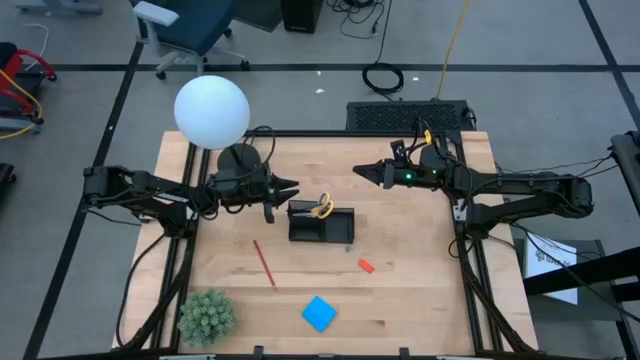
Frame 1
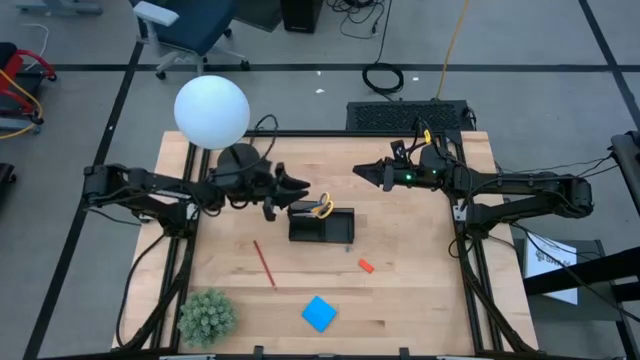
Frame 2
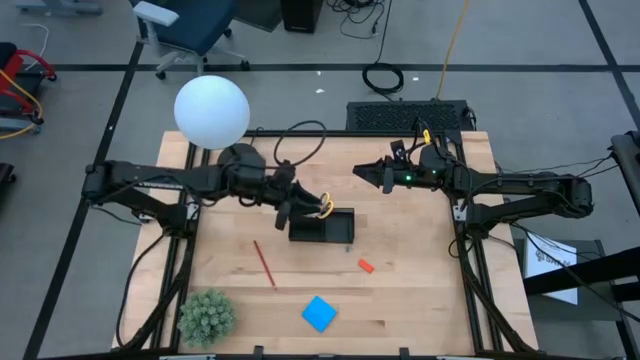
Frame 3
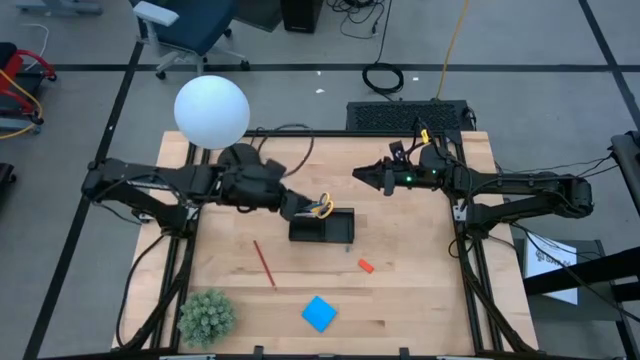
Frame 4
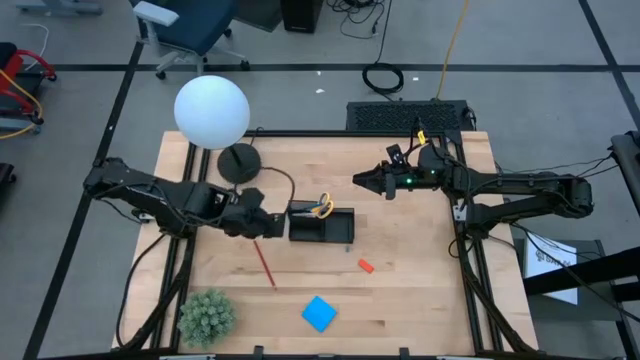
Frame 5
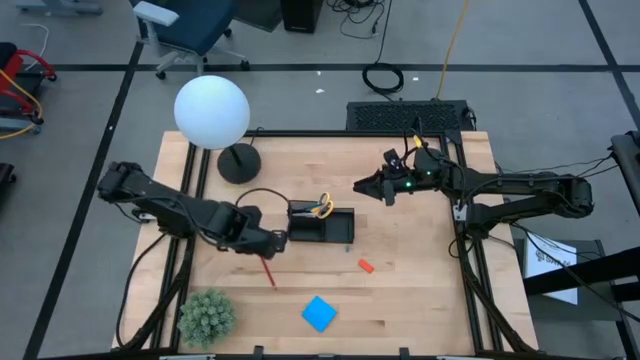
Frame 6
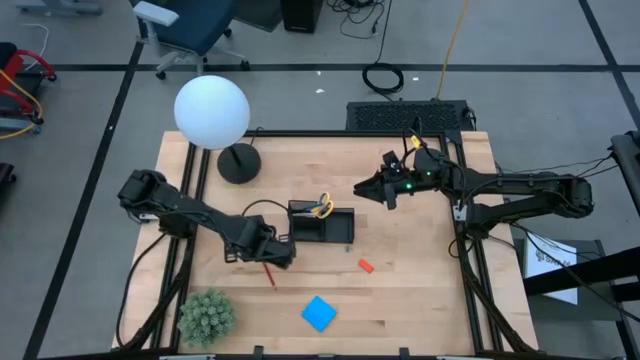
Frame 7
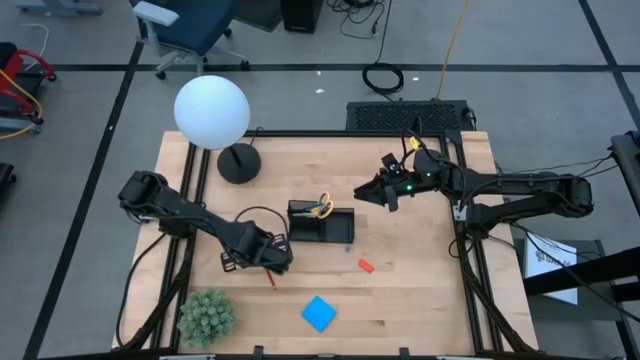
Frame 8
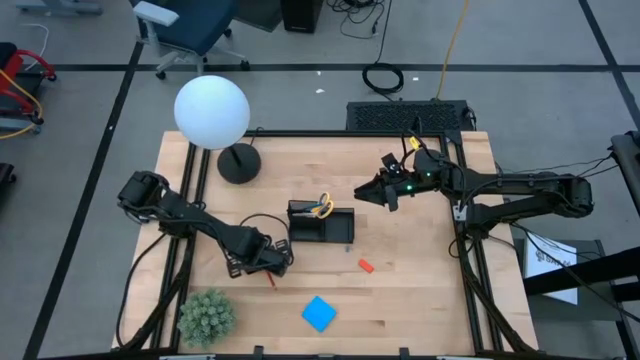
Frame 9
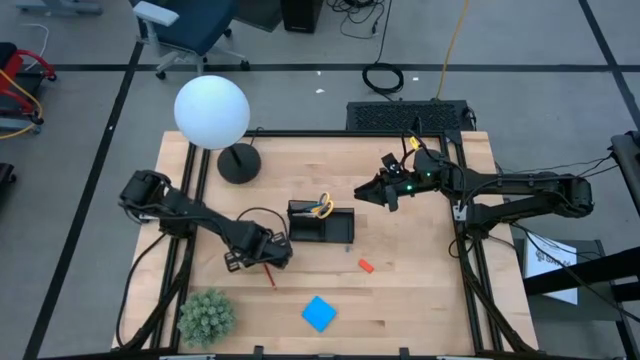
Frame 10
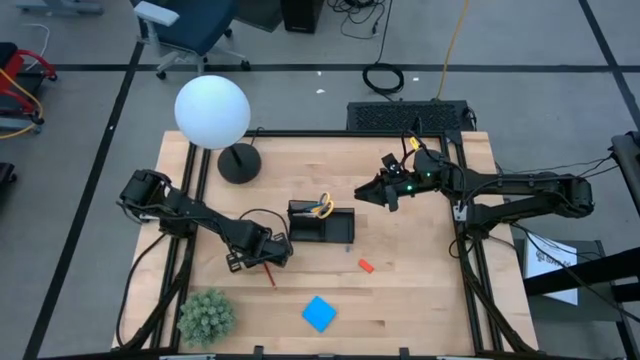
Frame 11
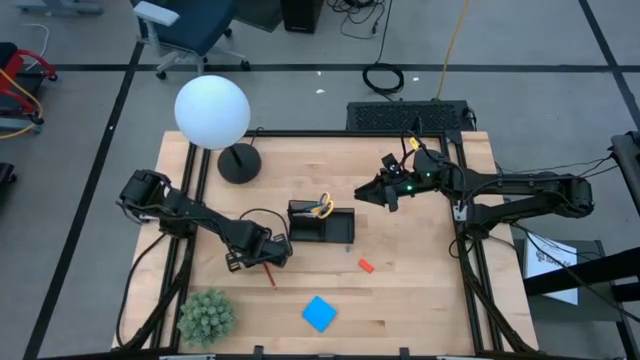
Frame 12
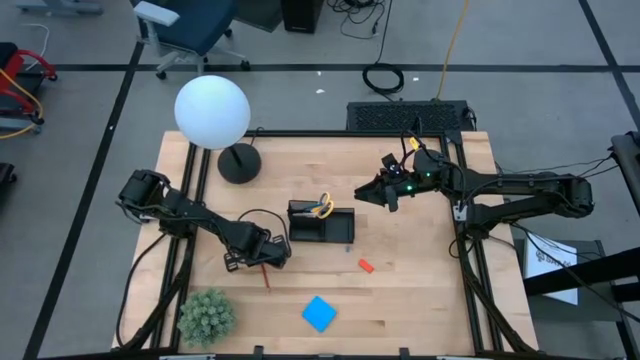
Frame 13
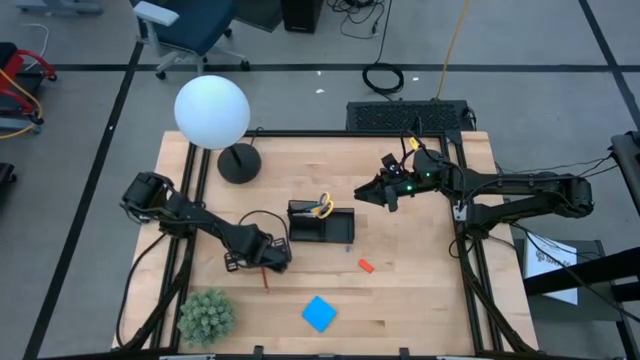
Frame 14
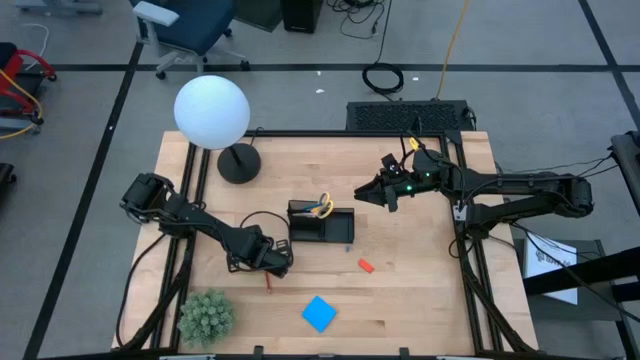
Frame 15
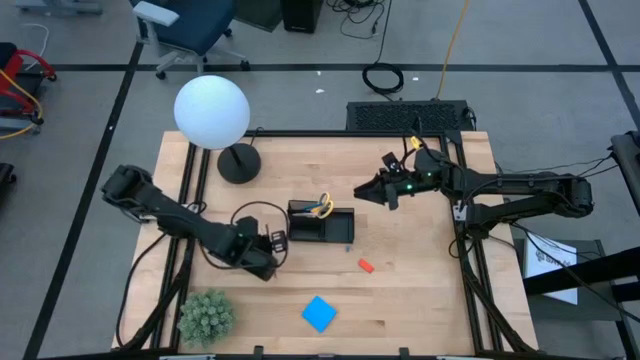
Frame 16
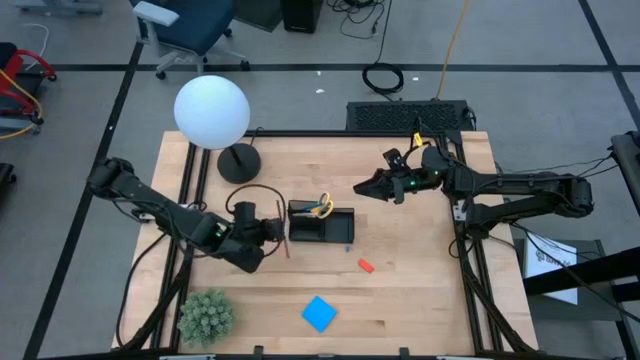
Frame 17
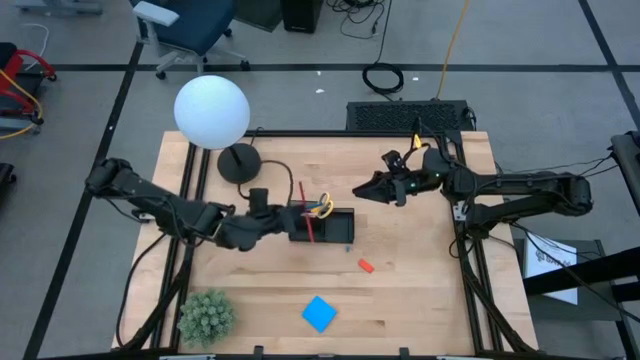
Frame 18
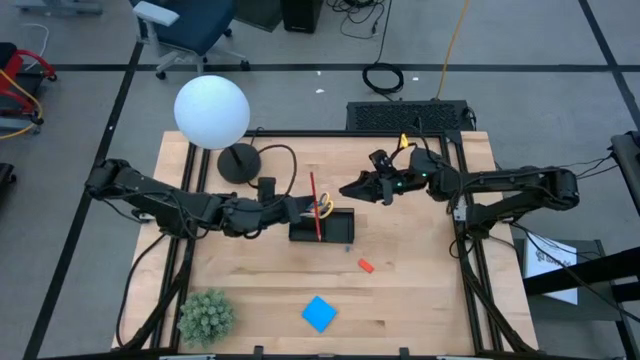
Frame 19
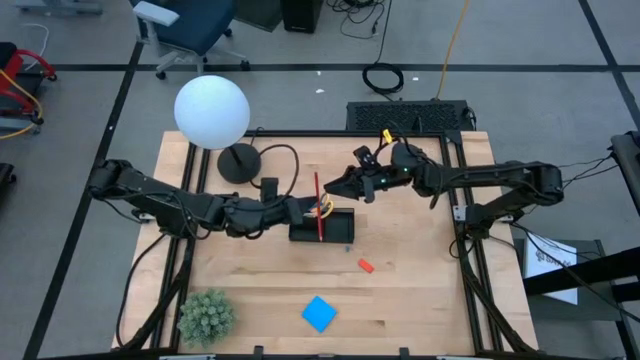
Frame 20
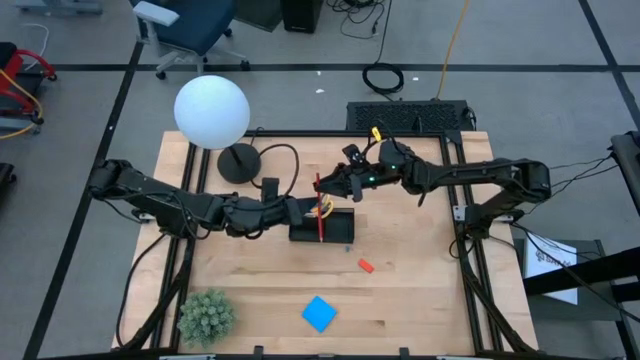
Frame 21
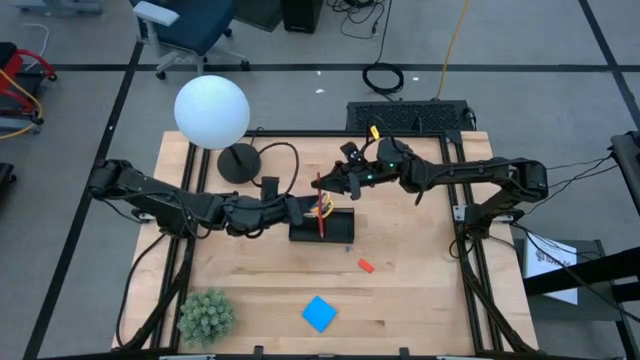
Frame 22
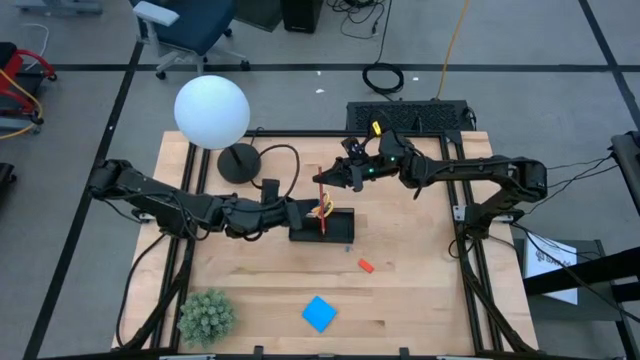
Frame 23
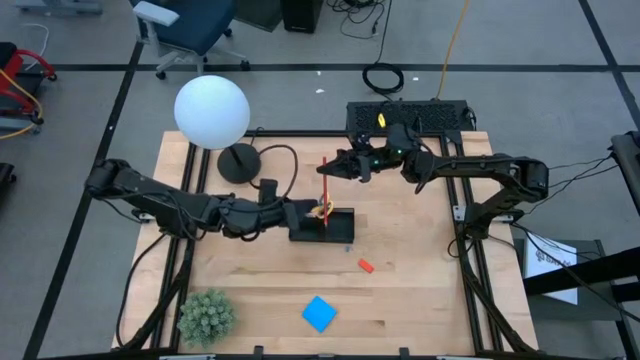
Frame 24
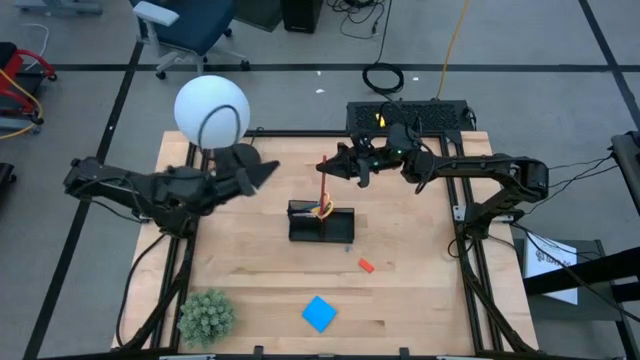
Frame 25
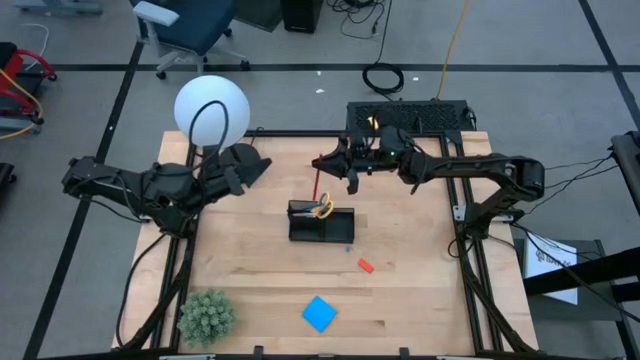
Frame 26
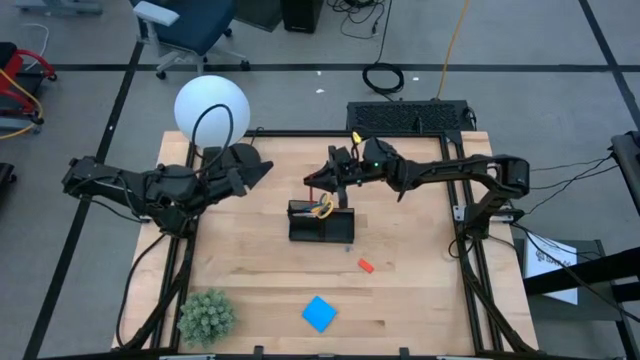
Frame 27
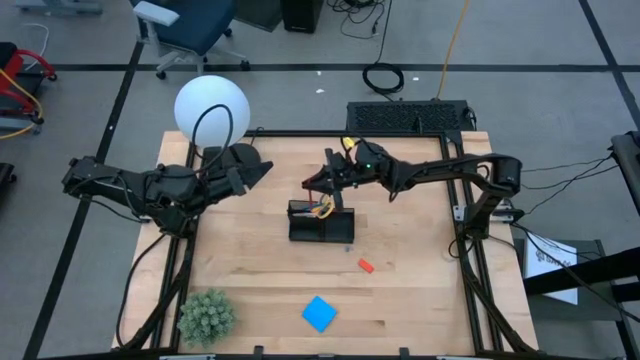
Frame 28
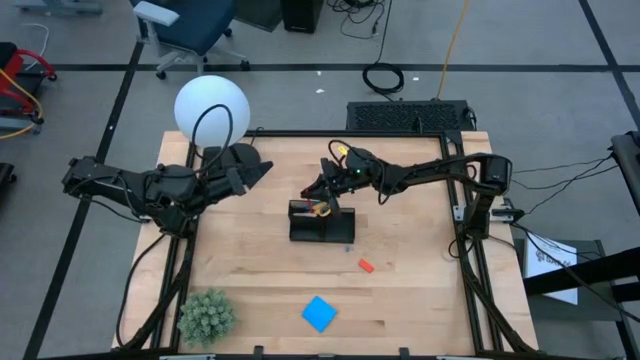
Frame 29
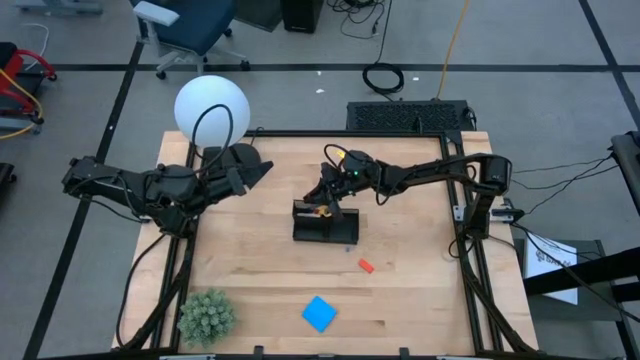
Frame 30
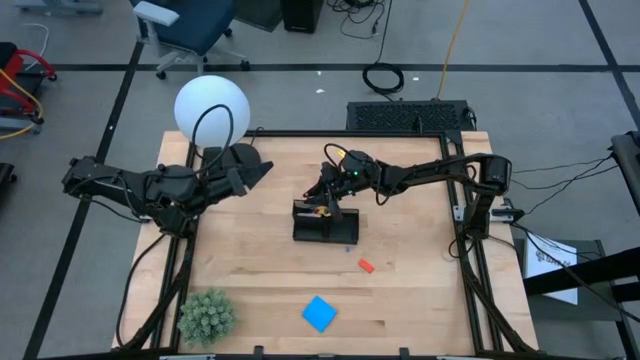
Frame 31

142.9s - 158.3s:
Task: Pick and place office supplies into organizer
Put the red pencil into the desk organizer
